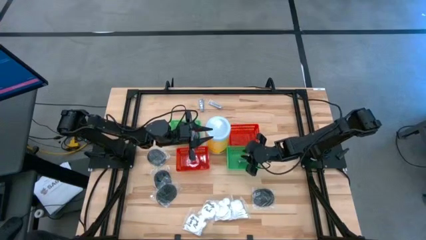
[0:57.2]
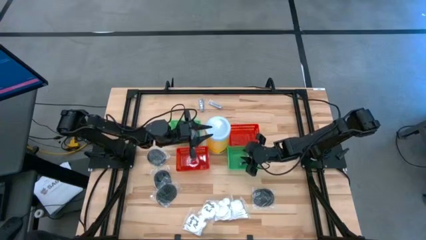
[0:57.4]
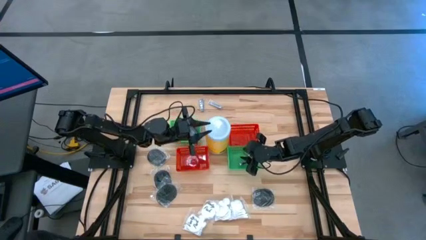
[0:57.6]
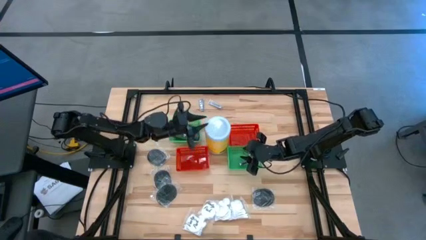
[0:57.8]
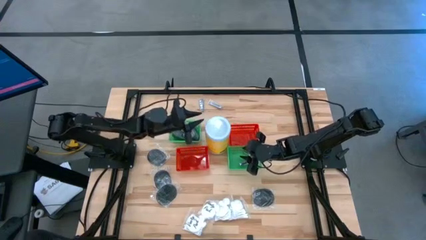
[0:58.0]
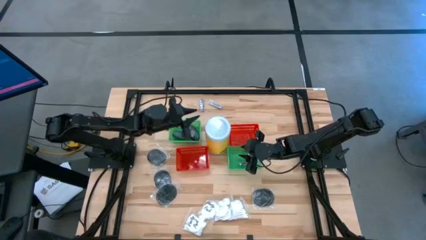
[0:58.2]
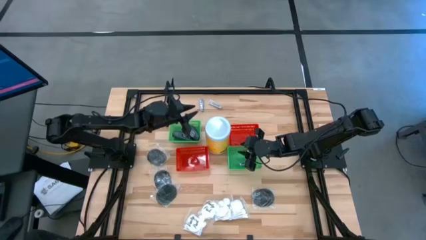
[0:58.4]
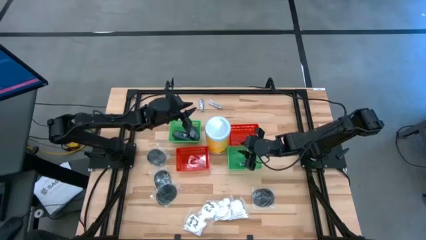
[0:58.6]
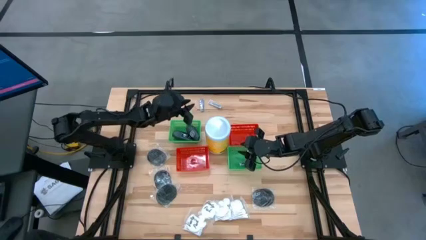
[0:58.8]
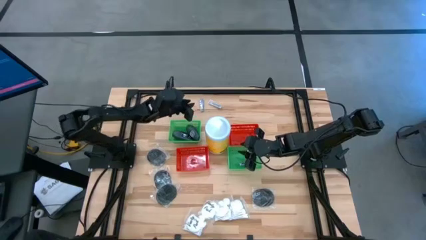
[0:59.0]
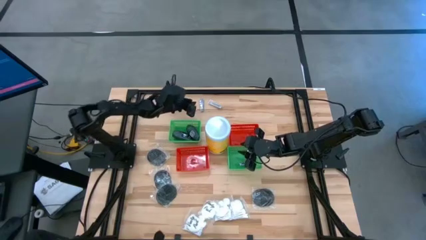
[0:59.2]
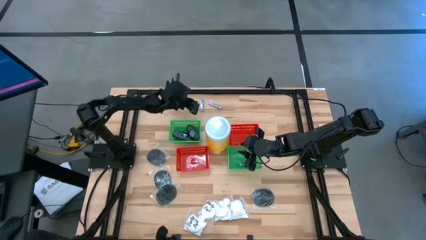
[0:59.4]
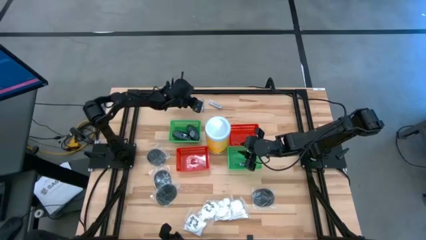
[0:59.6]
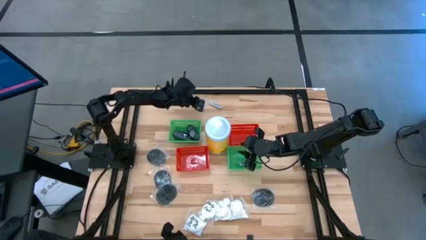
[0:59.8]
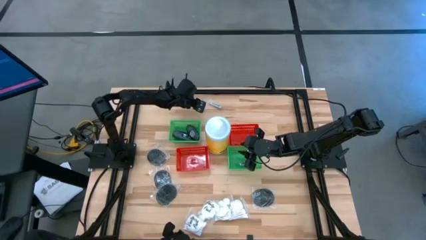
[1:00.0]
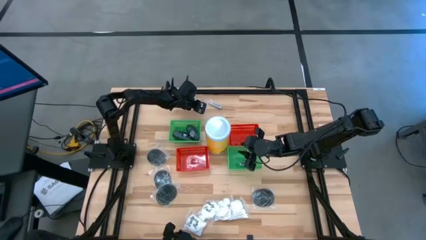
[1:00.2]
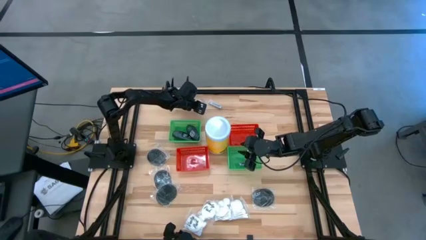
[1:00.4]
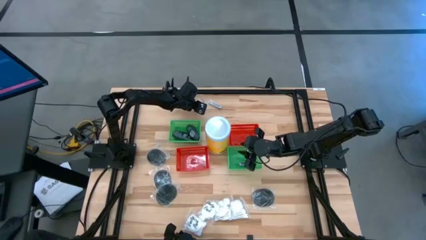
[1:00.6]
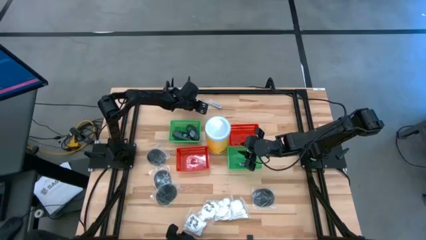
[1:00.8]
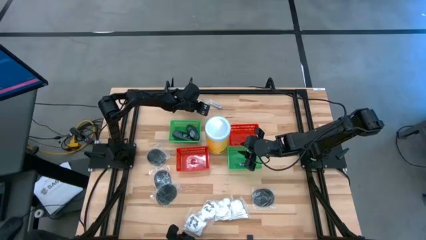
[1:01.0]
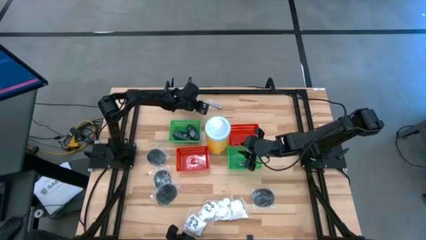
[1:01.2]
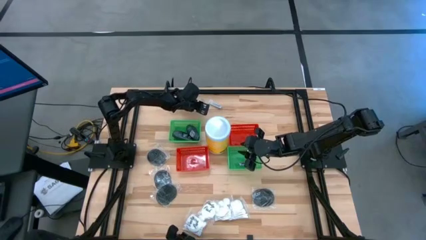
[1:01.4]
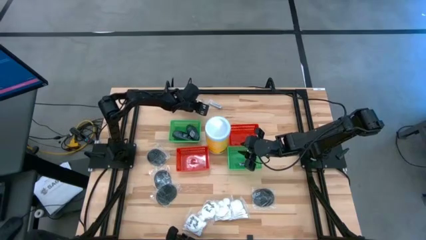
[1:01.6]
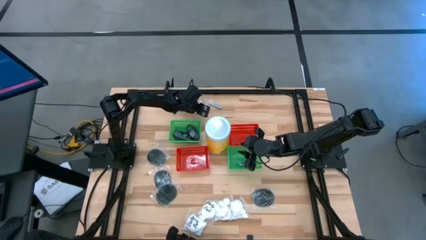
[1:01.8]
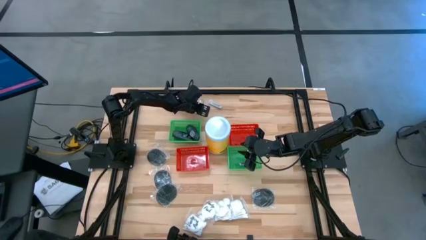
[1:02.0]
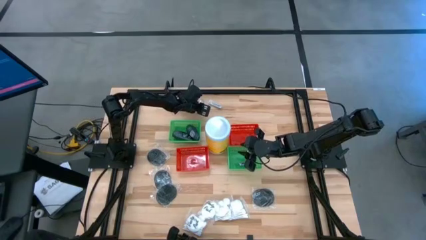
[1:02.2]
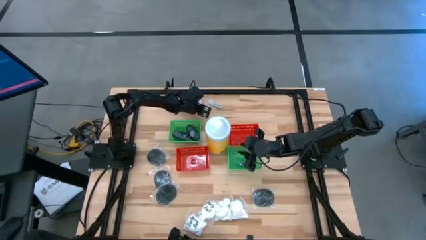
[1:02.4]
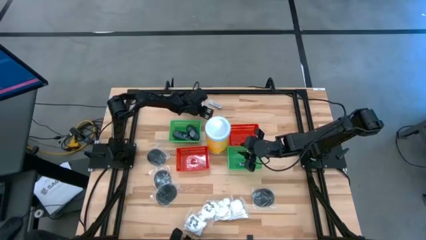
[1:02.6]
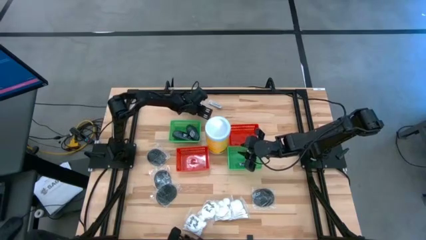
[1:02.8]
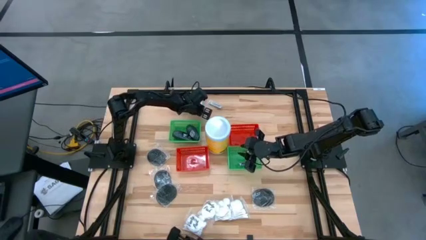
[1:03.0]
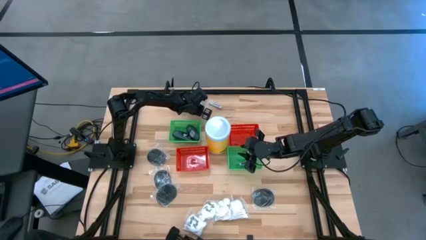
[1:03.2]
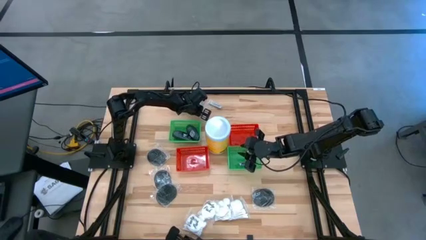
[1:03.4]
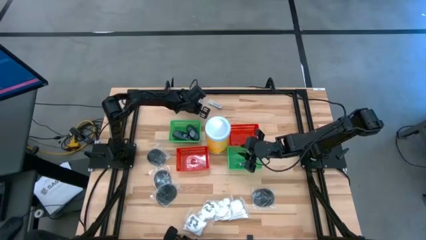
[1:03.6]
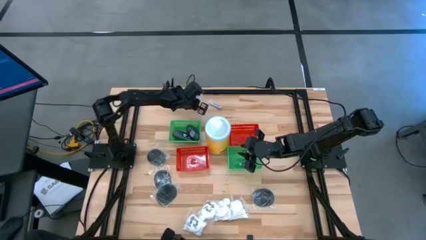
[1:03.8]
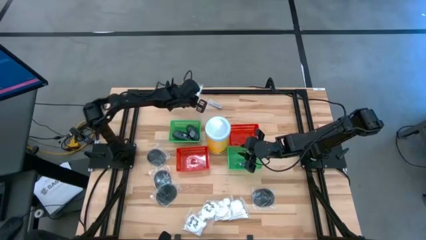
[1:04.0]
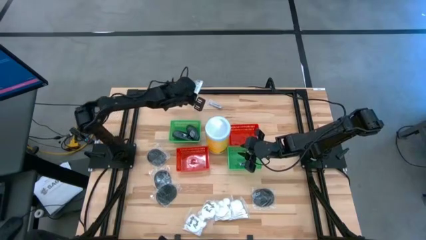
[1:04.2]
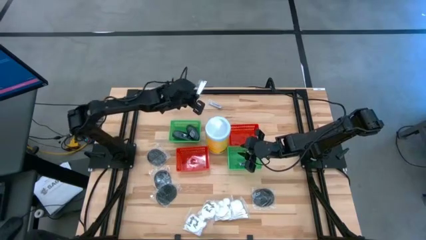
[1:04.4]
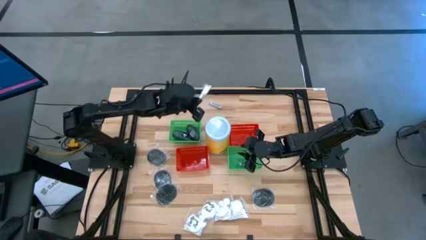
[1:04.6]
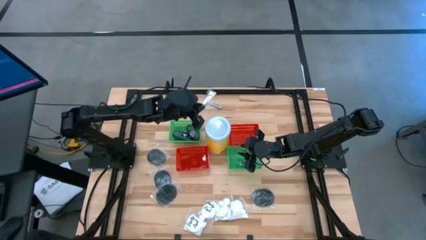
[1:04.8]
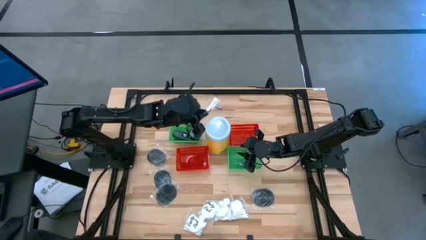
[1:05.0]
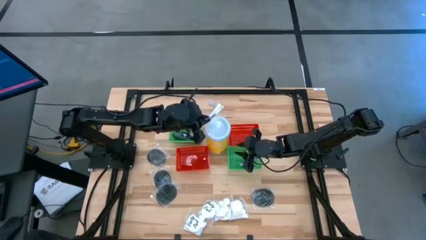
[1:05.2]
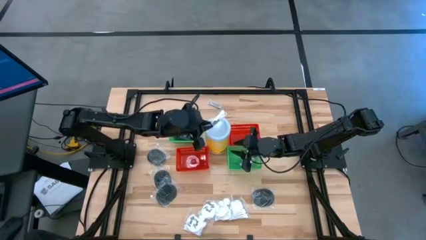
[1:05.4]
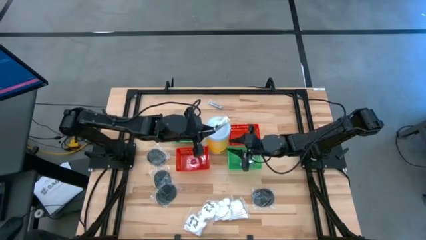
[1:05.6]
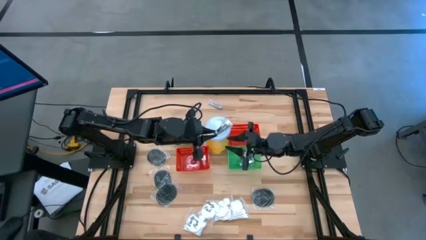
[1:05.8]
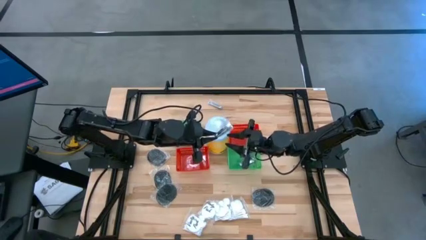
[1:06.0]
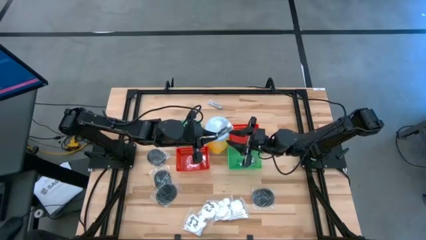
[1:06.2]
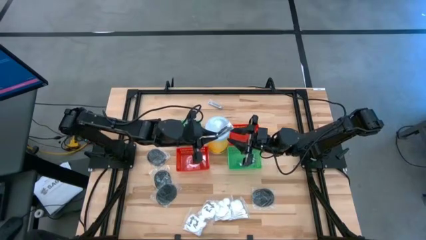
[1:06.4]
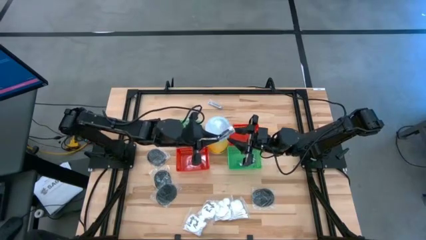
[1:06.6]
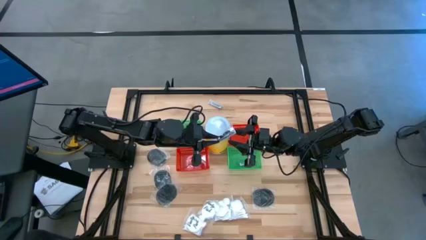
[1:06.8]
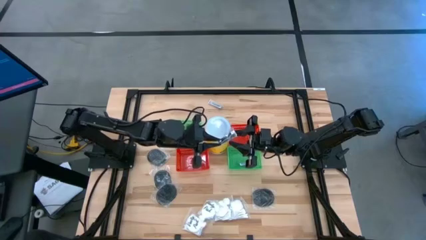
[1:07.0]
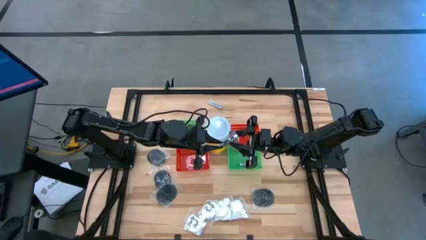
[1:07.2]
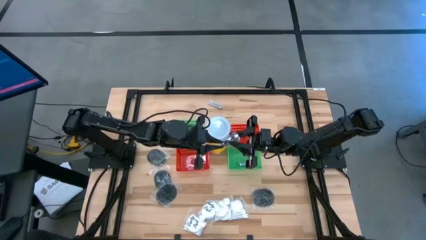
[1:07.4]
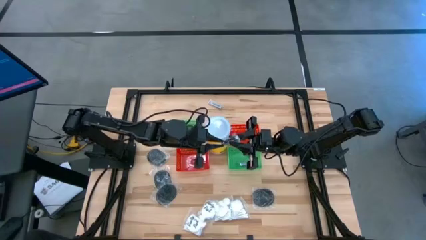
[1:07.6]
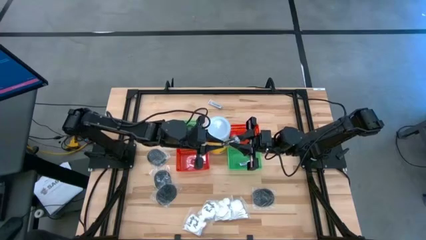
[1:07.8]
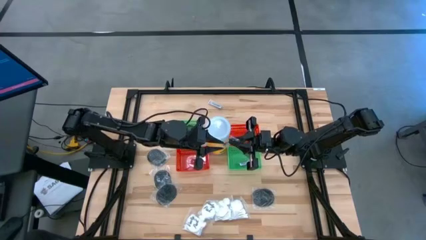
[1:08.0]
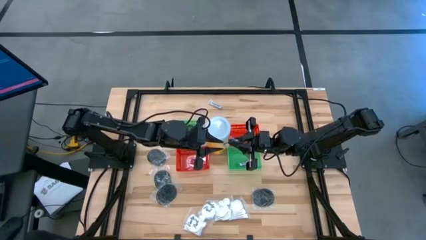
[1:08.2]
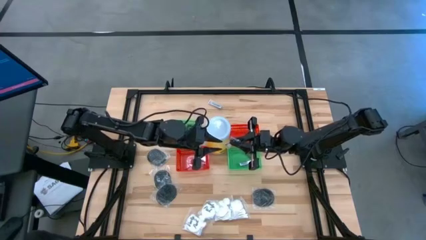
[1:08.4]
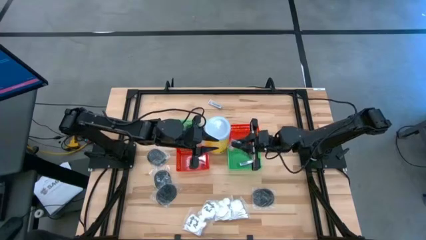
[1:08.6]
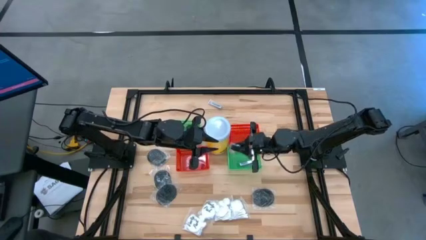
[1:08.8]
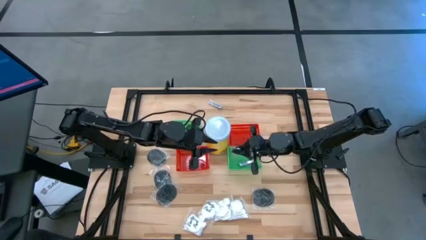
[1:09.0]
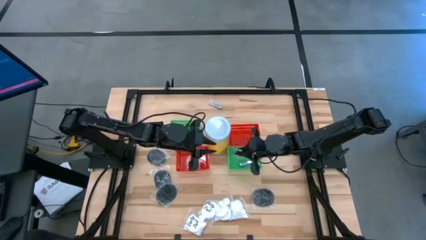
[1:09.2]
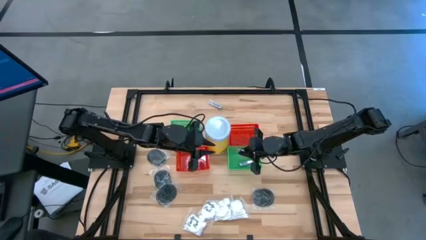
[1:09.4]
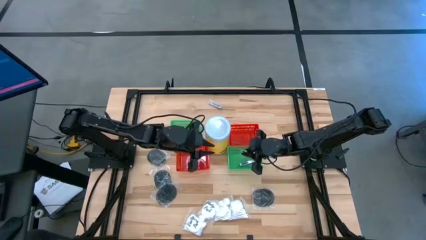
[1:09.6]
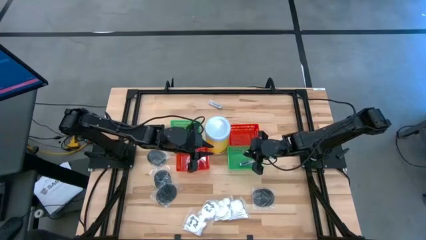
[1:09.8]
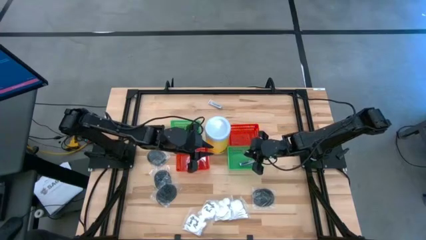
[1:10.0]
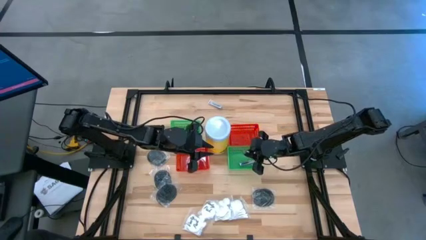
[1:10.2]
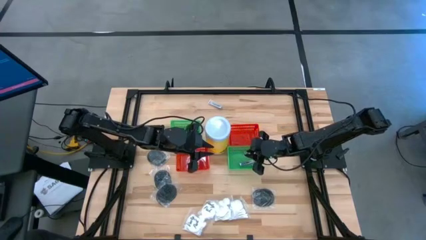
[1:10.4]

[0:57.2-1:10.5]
Task: Pick & Place Travel size toiletries
Put the silver nail cutter into the right green bin
